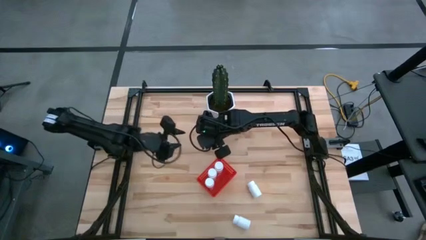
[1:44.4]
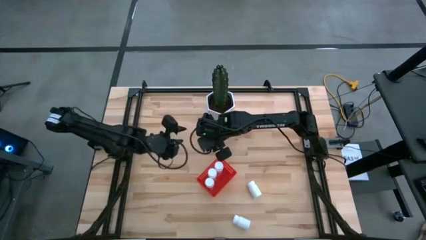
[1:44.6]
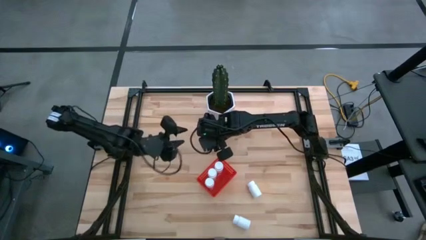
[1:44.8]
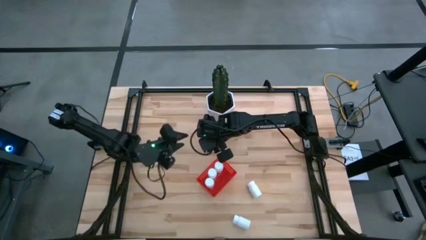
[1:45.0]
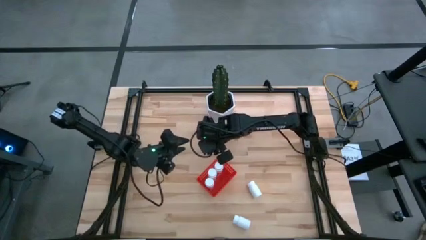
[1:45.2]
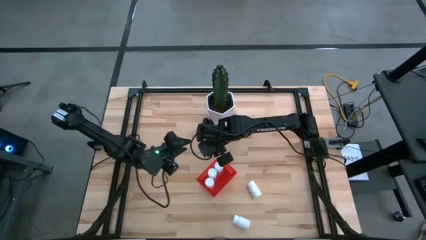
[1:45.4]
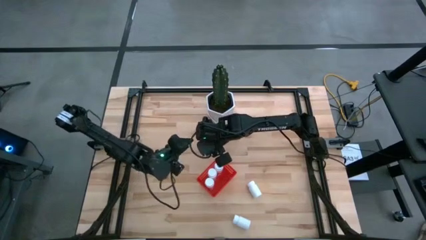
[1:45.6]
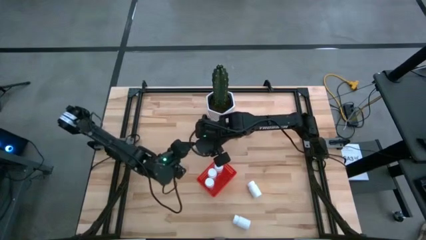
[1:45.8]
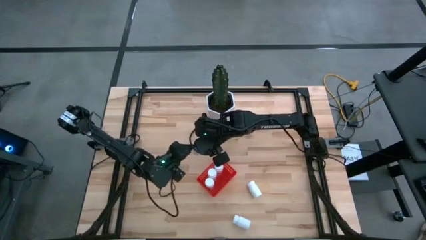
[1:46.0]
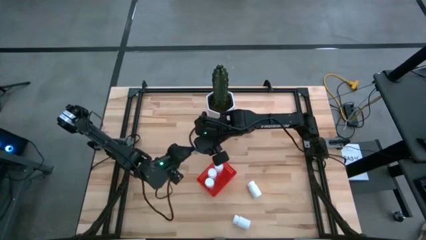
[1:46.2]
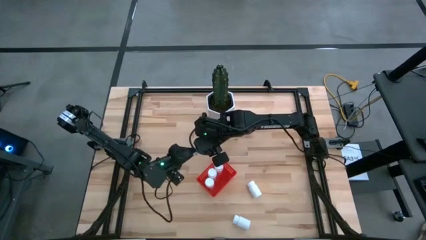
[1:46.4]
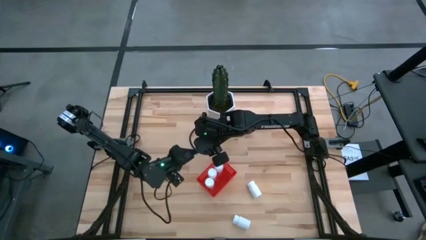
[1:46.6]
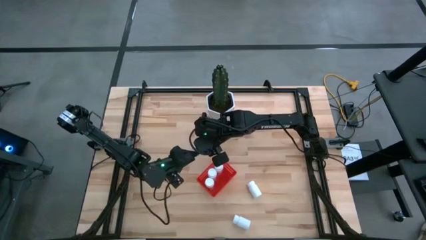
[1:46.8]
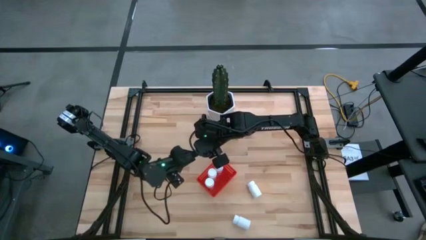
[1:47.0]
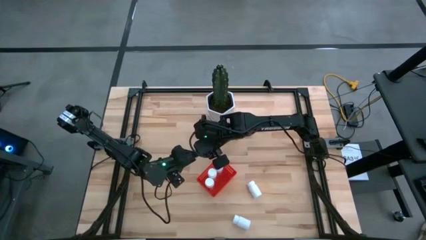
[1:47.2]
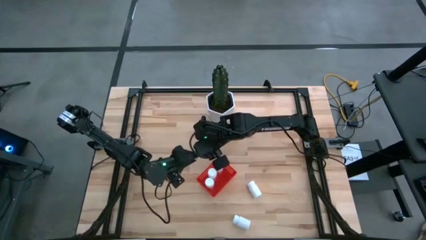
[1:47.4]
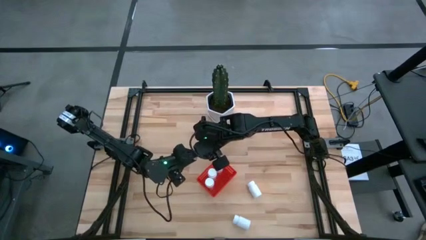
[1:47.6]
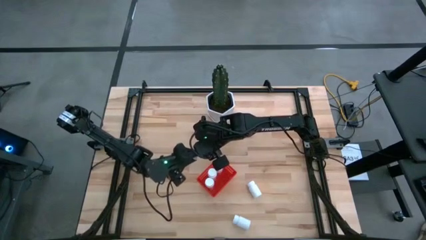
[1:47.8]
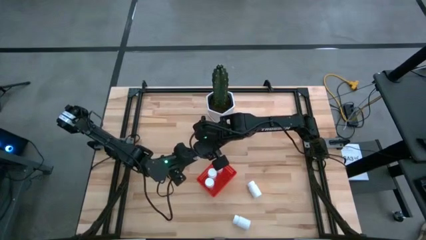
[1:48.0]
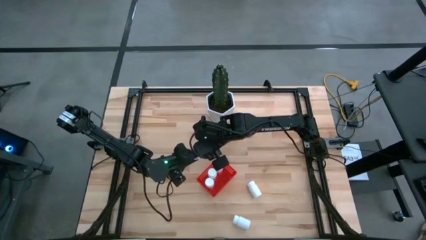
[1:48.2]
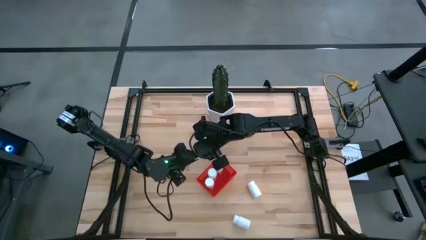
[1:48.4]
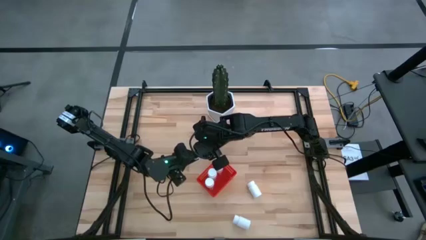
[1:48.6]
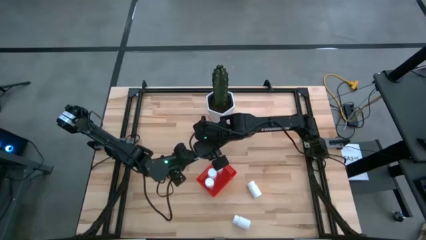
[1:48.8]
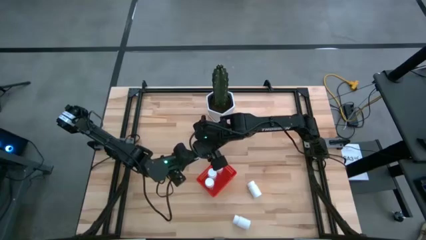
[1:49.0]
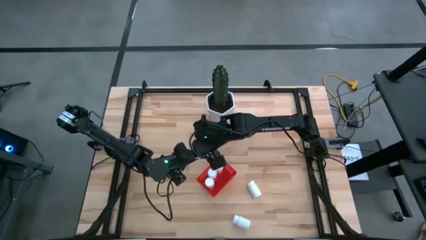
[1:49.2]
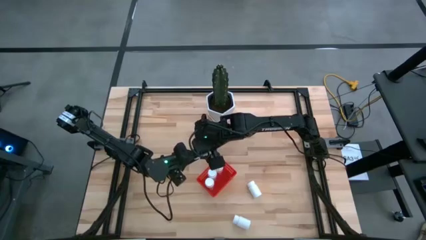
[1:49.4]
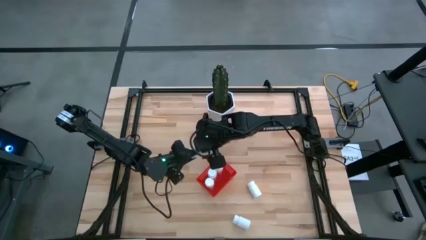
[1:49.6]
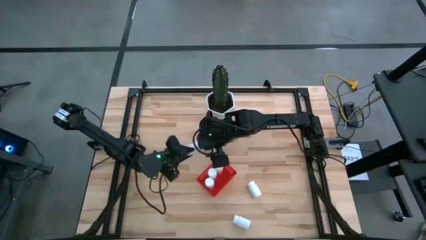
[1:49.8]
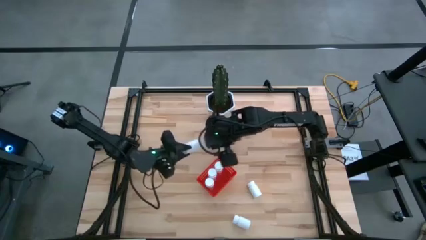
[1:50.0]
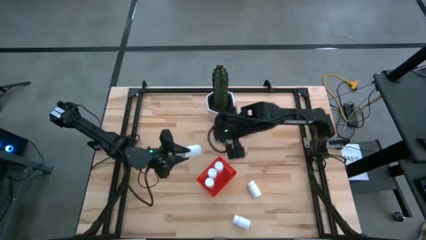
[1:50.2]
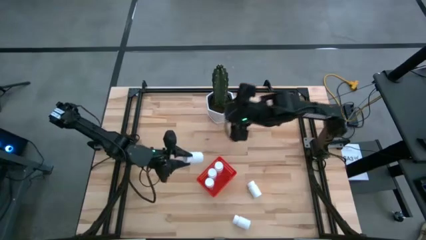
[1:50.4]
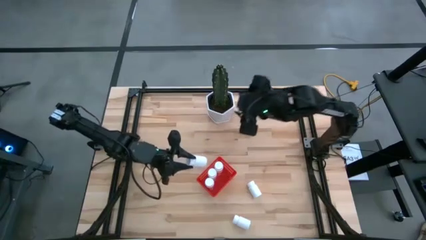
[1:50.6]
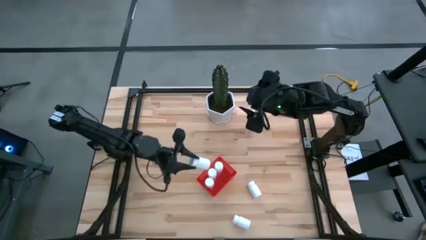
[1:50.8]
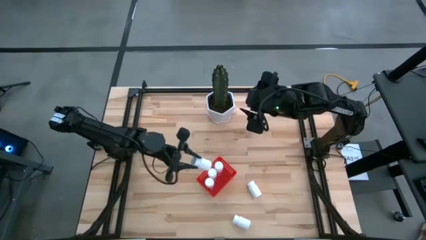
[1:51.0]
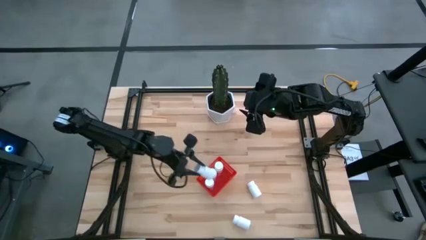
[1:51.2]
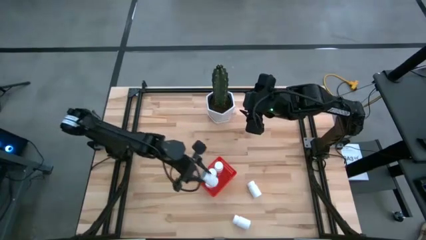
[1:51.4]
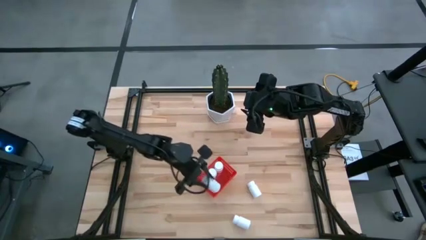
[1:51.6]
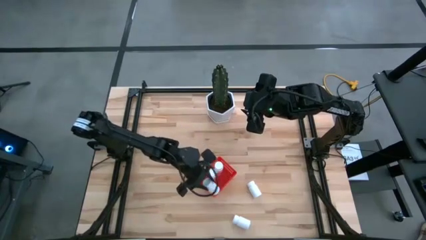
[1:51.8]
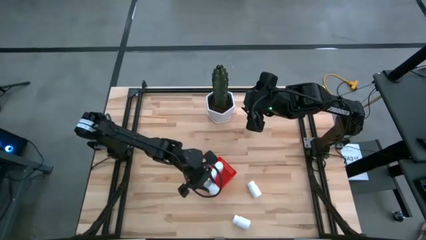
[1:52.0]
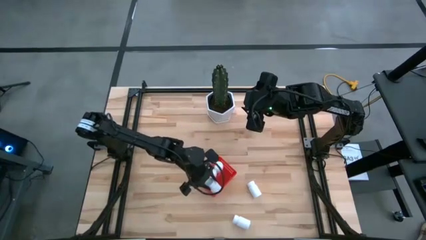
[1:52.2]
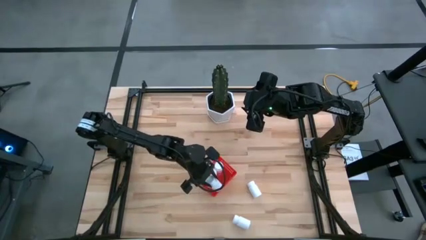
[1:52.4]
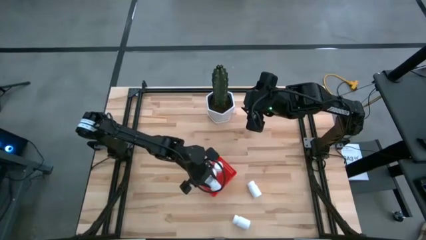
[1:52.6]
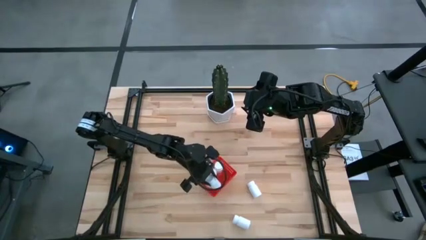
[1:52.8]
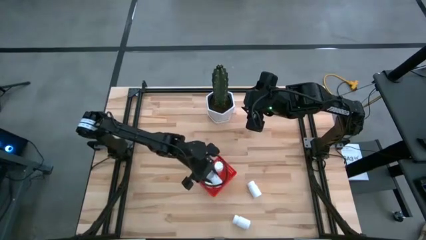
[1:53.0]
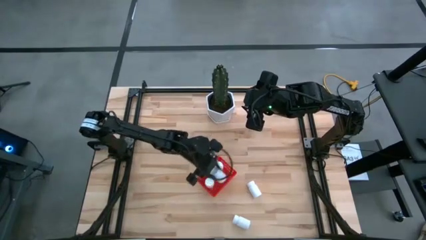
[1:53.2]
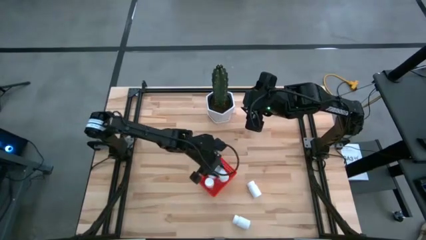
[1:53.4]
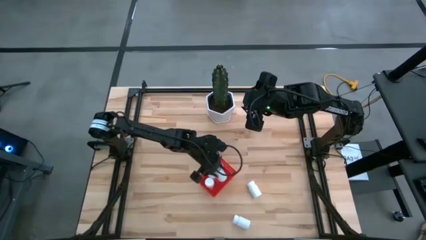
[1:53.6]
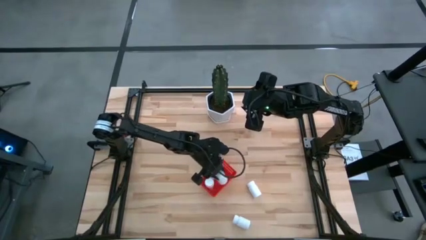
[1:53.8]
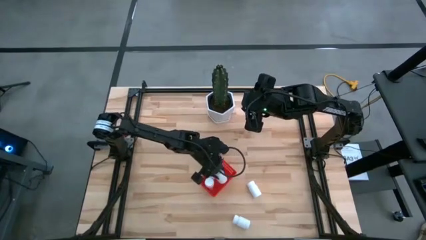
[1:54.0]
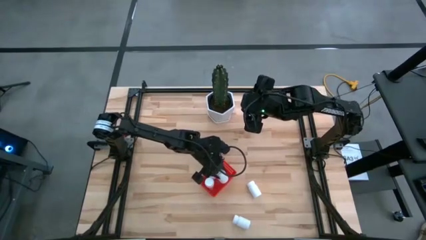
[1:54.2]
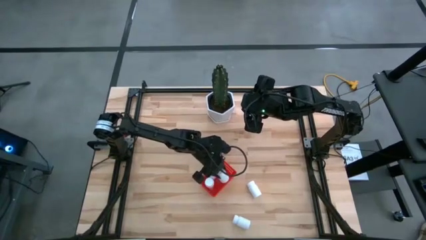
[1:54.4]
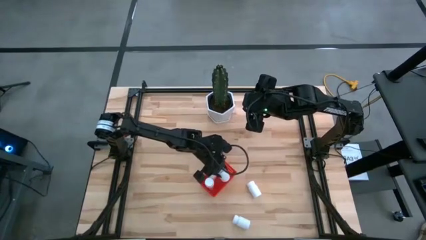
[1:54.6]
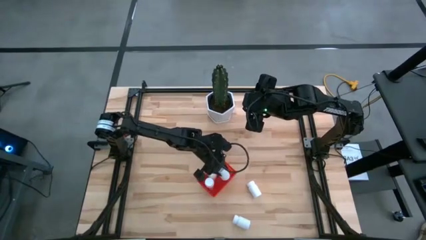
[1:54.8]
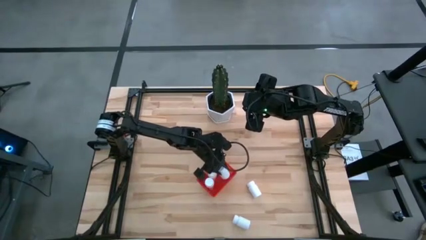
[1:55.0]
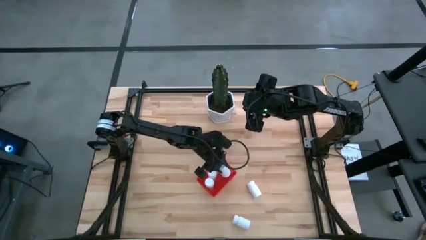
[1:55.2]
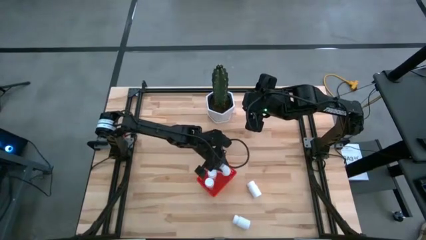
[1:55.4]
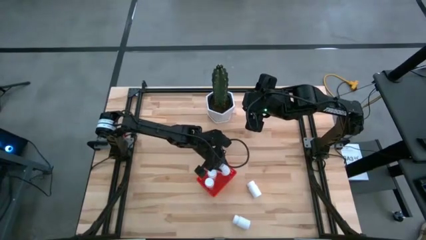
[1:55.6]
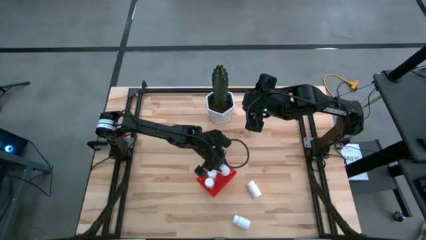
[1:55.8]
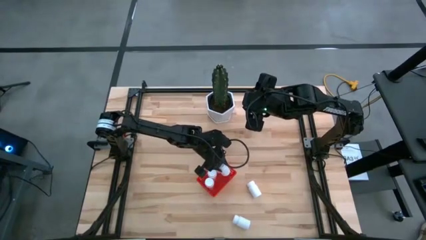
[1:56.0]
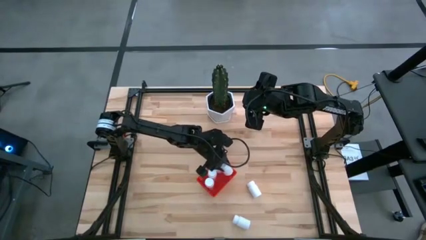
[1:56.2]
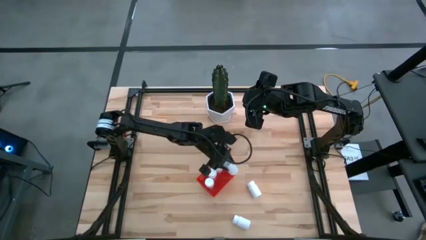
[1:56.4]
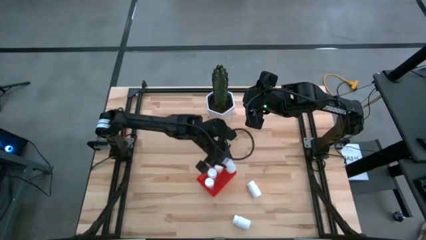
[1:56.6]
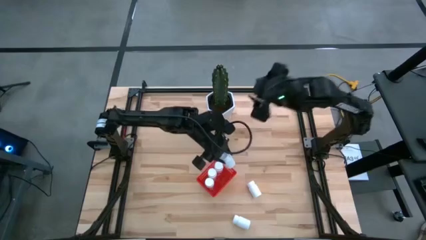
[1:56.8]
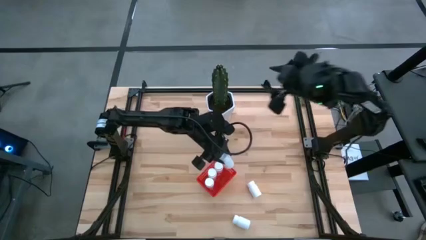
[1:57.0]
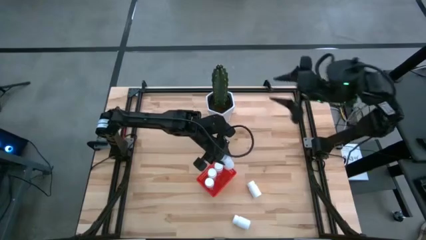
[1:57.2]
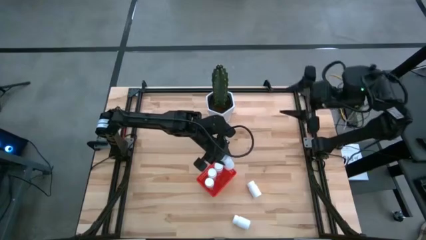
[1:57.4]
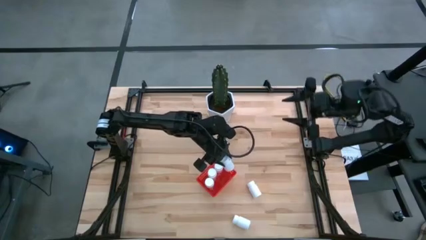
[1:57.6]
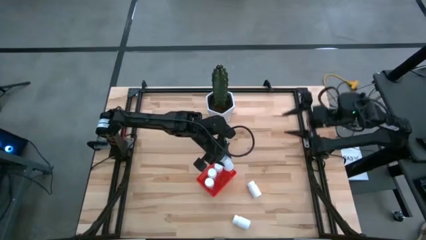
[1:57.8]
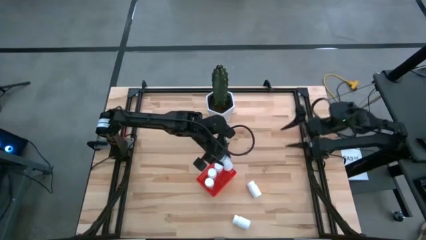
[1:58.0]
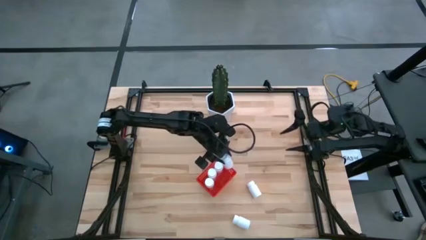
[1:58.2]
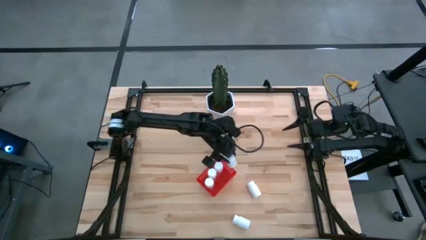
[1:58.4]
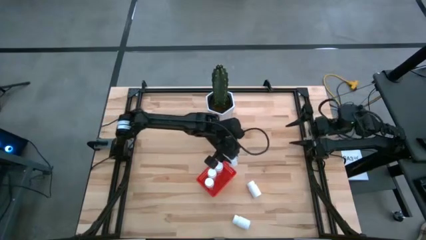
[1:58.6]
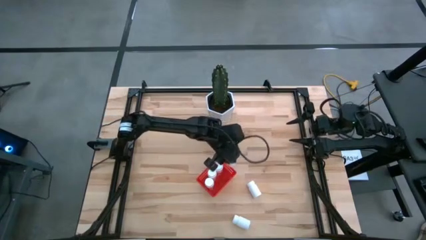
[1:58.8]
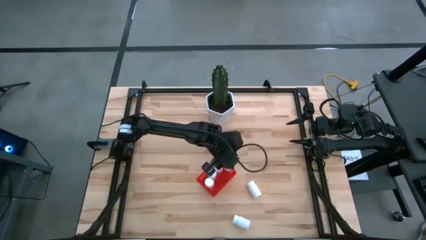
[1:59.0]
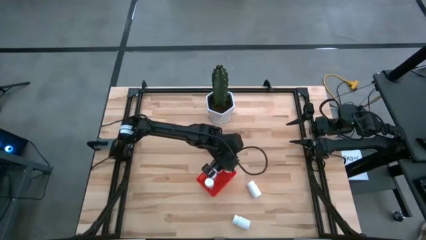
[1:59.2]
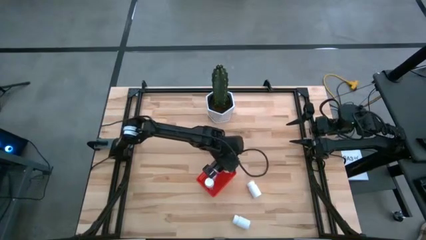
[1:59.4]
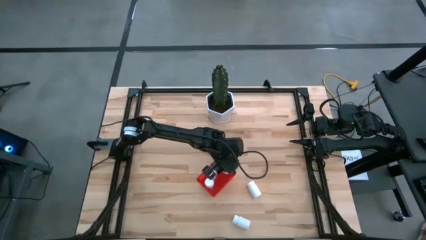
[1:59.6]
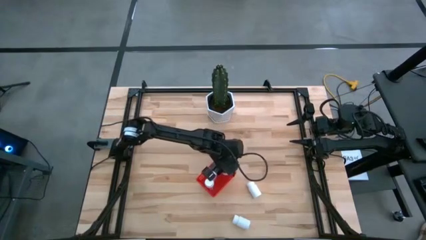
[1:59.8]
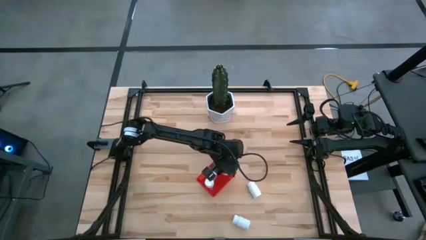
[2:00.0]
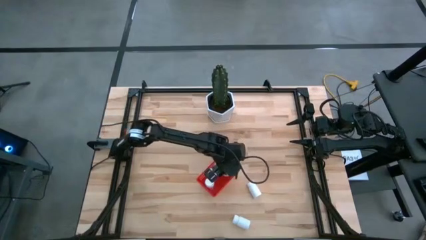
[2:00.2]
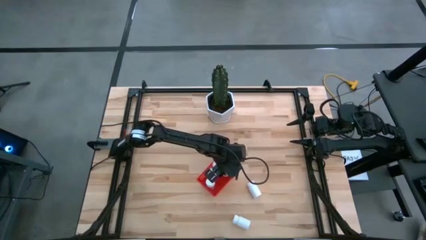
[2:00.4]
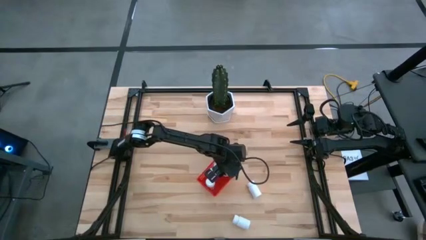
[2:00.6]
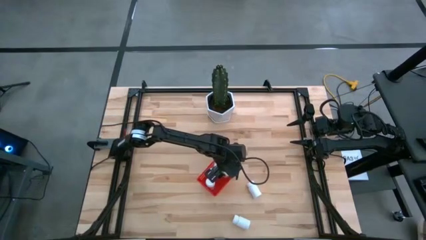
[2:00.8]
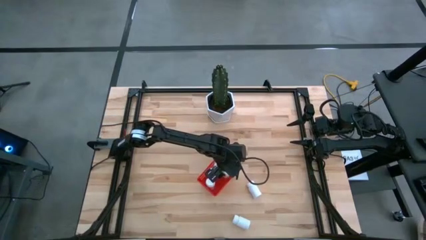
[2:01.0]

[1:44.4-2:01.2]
Task: Pick and place pill bottles into a basket
Put the white pill bottle into the red bin
